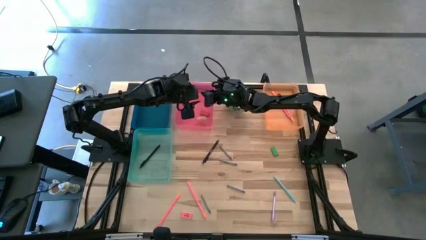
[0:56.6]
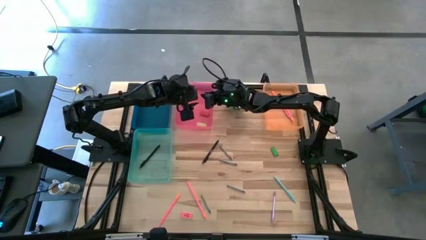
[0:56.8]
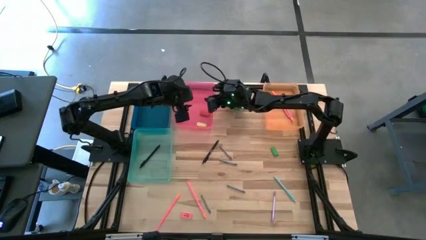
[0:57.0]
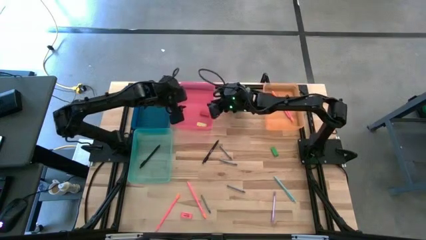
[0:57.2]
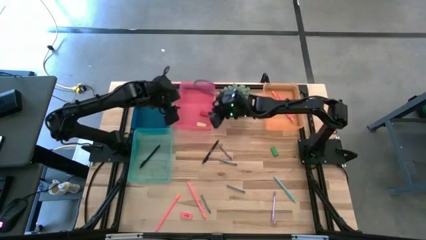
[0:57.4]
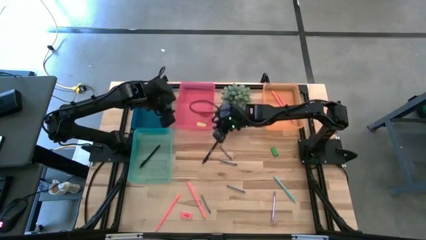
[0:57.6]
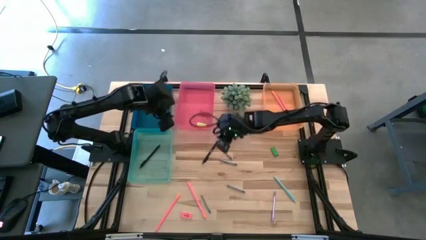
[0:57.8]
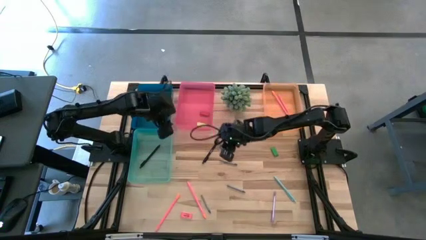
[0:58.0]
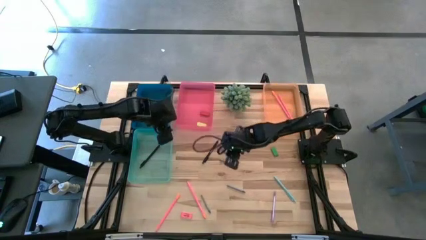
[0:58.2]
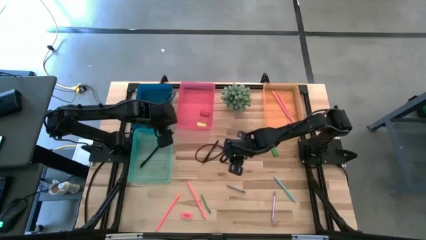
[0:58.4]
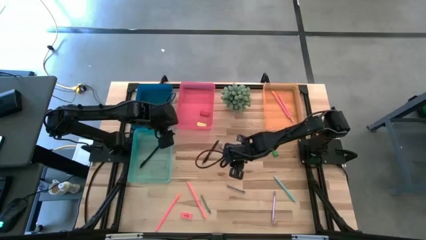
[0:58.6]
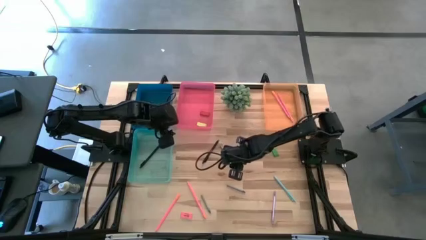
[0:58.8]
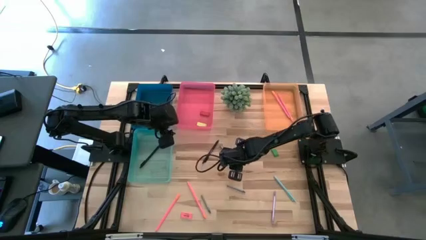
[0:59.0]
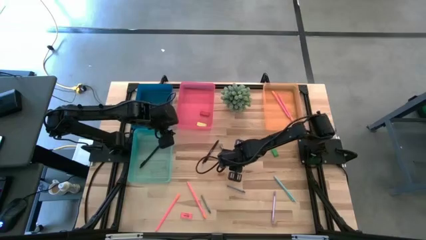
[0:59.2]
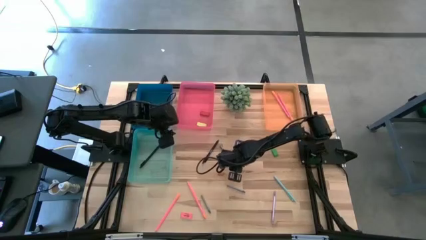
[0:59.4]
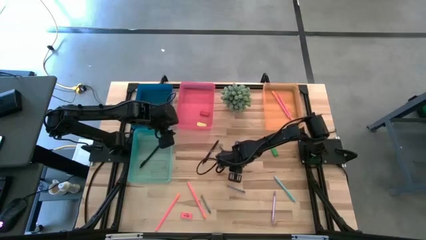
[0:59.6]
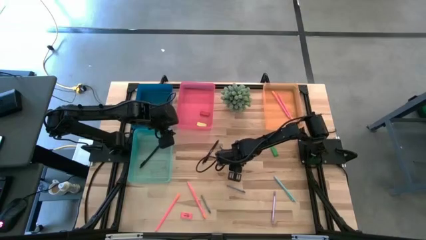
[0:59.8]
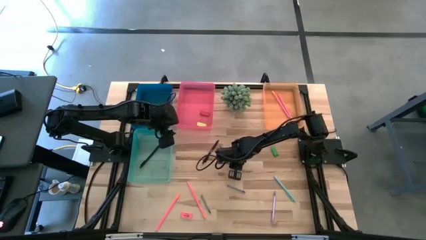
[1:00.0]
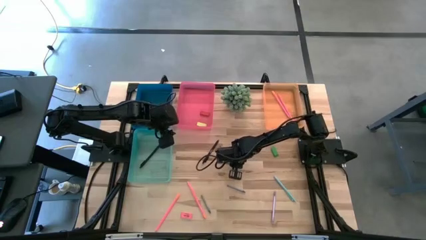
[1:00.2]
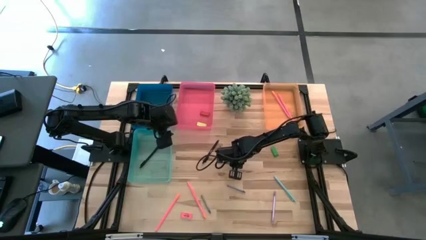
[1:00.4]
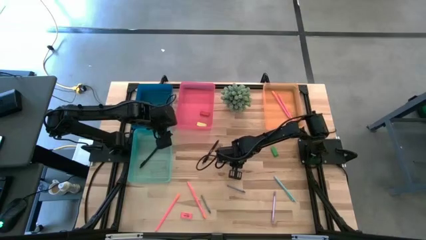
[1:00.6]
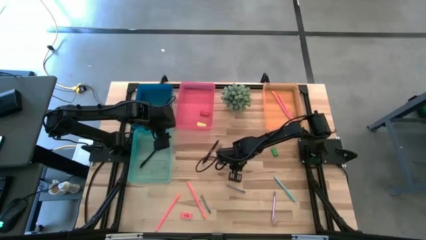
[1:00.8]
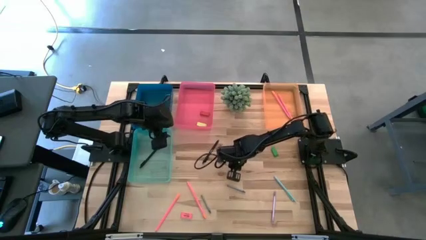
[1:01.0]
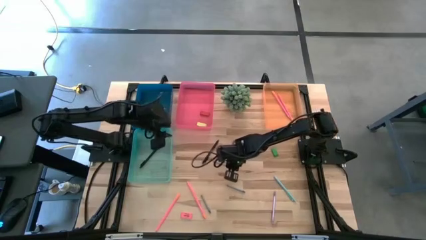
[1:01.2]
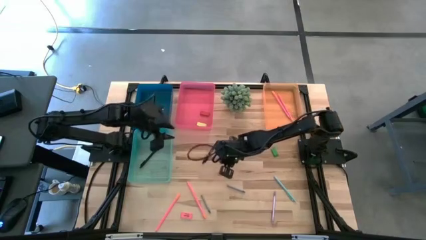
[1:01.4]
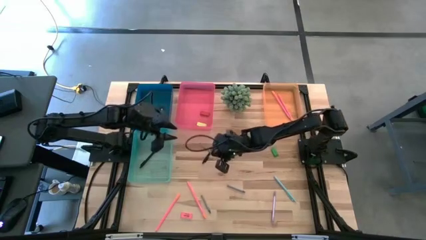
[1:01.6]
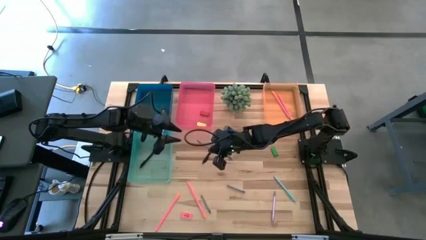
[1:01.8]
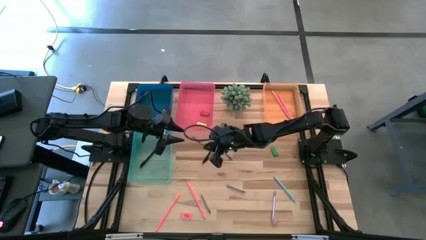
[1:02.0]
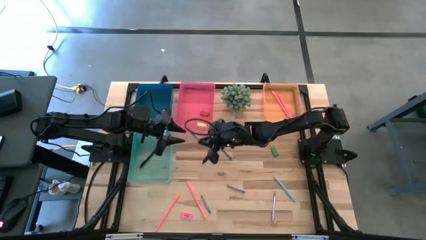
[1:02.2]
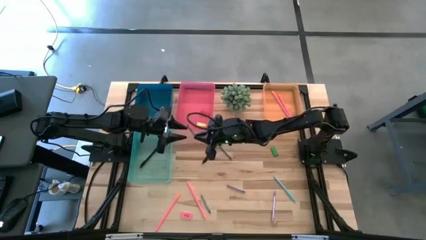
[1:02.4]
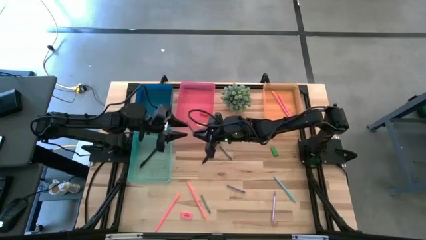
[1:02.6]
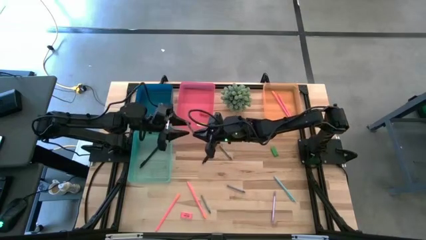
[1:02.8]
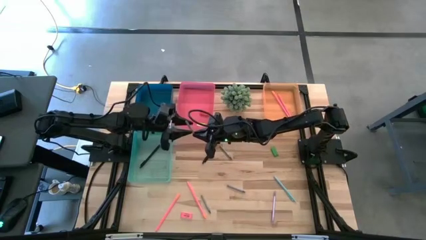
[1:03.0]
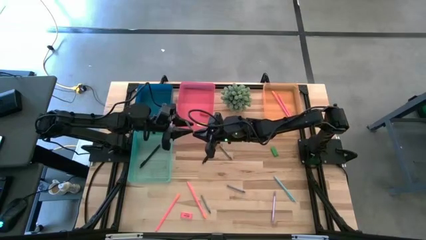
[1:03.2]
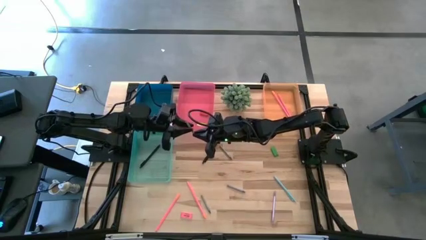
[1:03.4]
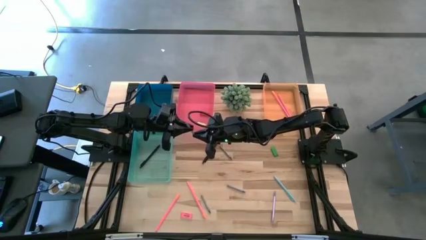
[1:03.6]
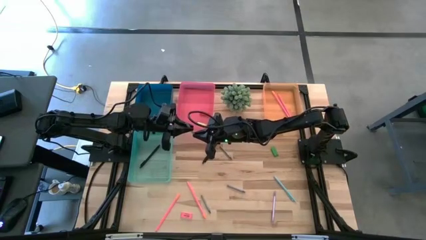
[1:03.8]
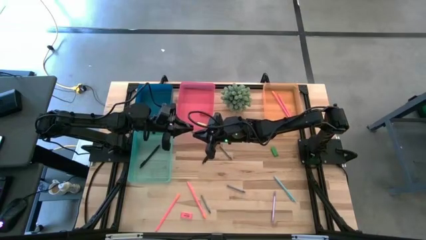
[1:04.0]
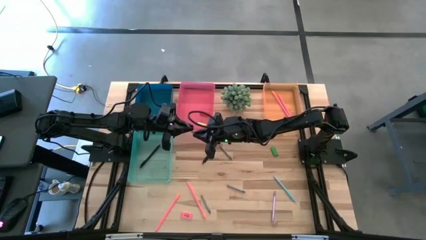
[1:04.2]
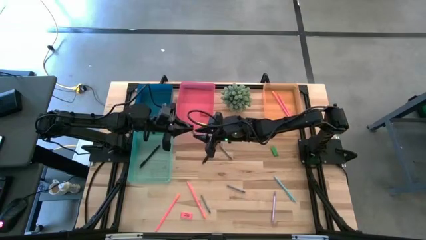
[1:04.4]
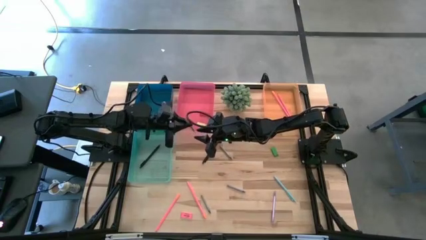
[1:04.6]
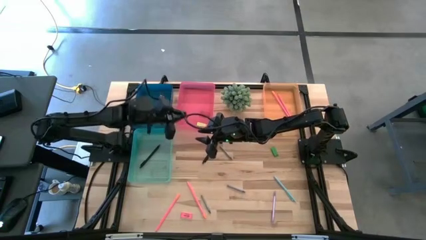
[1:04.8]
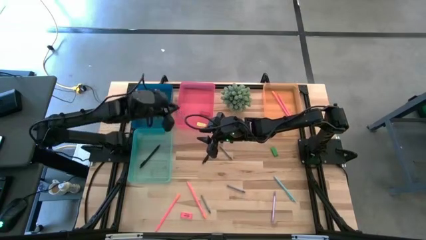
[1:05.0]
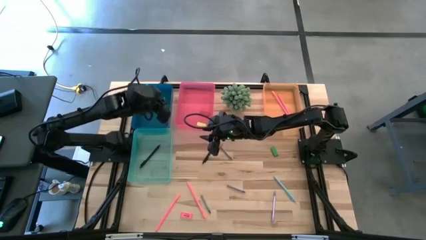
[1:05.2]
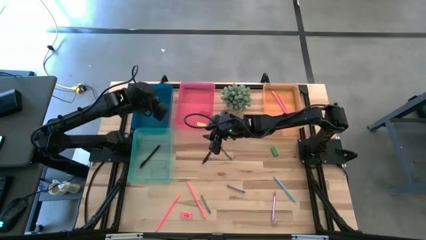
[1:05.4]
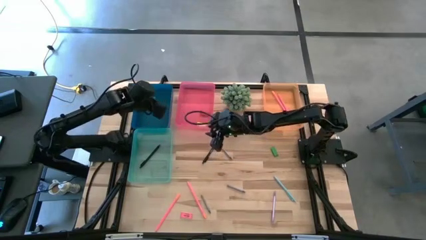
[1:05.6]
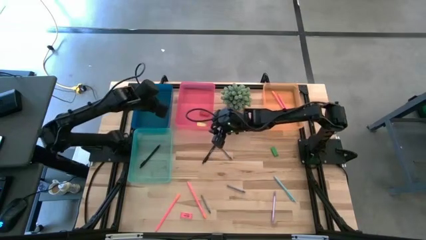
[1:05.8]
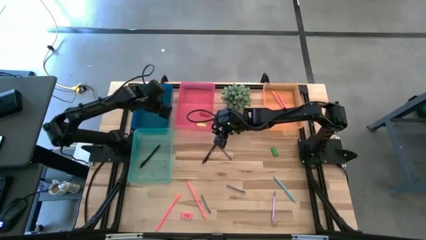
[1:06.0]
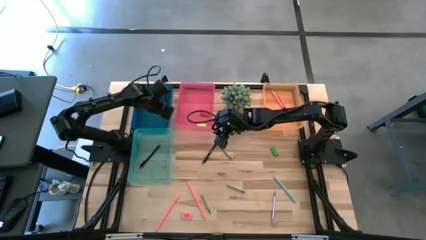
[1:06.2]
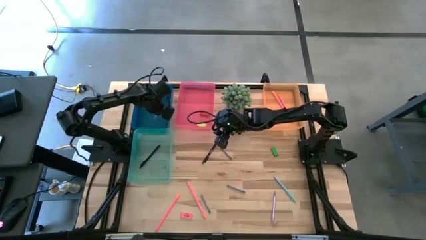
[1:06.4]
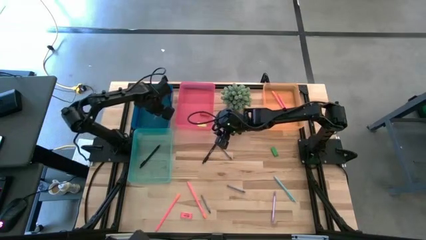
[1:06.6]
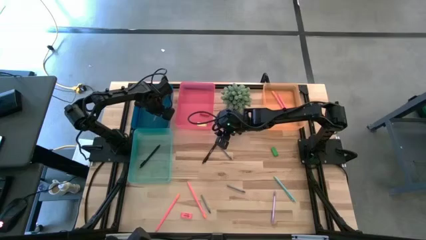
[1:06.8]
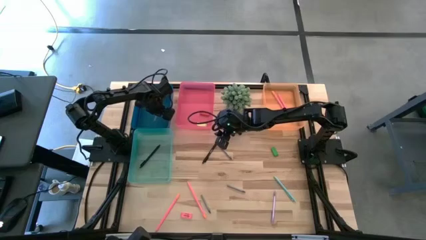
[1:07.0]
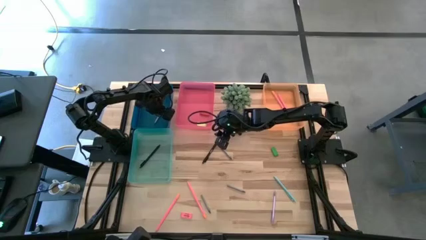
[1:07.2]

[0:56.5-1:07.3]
Task: Sort crayons/erasers/pens/pencils in bins
Put the gray crayon into the blue bin

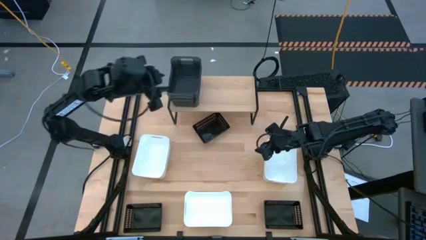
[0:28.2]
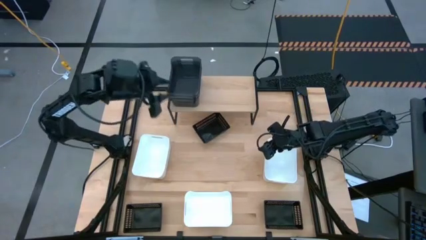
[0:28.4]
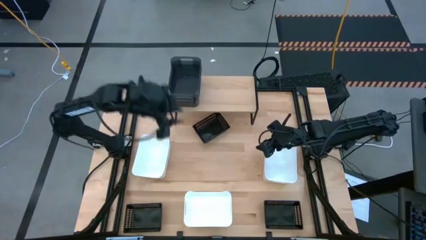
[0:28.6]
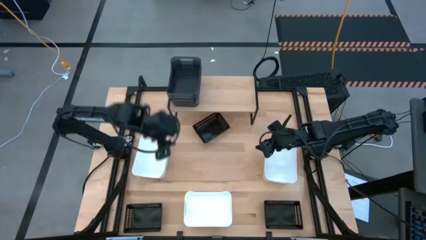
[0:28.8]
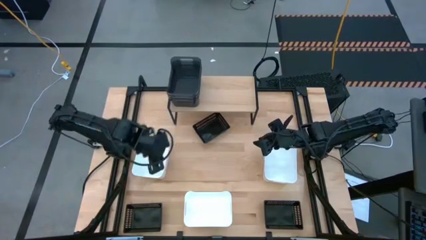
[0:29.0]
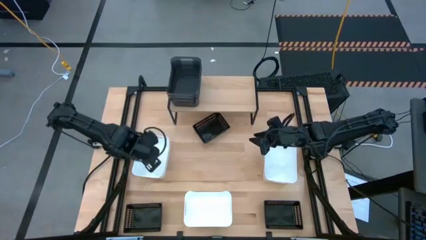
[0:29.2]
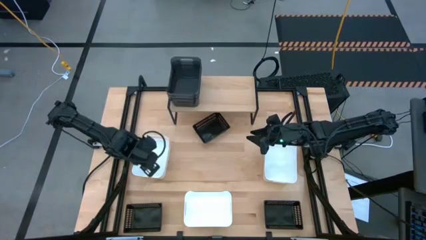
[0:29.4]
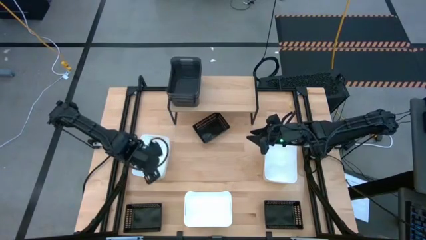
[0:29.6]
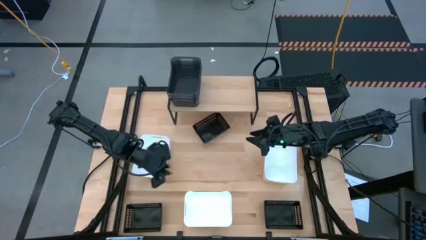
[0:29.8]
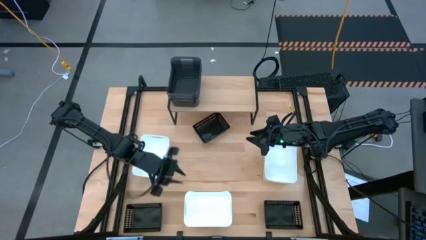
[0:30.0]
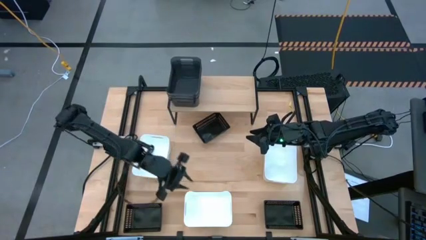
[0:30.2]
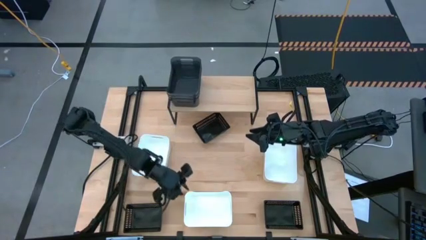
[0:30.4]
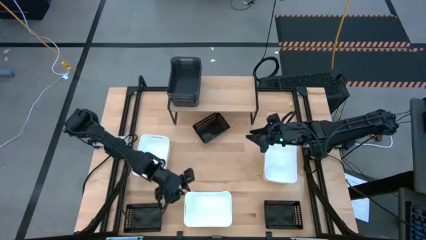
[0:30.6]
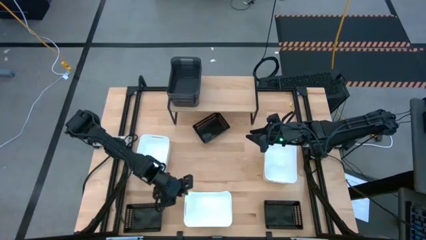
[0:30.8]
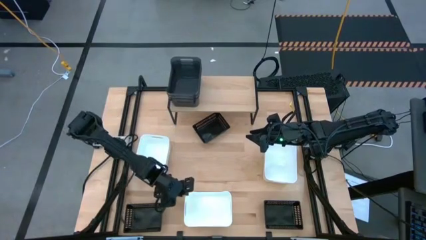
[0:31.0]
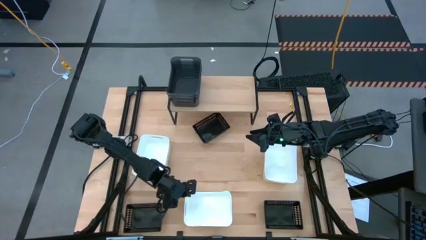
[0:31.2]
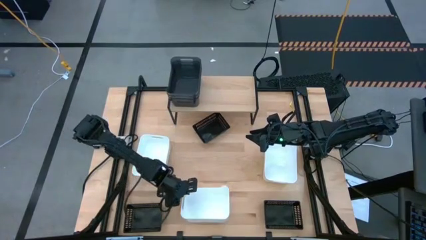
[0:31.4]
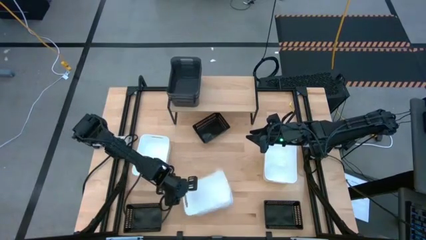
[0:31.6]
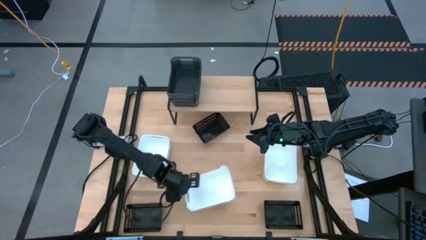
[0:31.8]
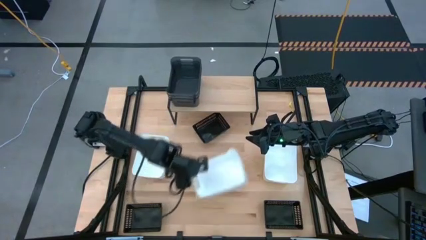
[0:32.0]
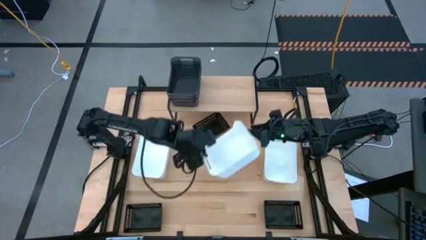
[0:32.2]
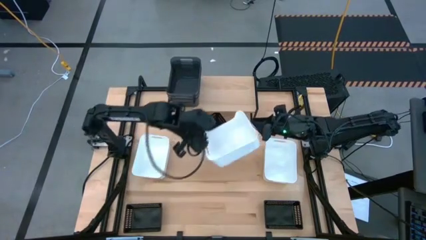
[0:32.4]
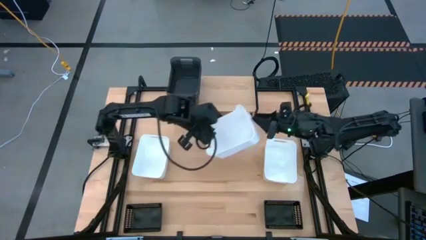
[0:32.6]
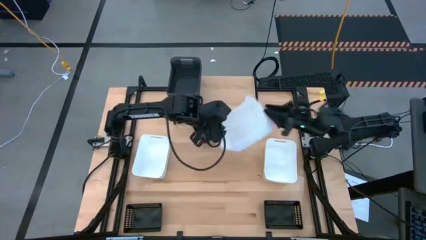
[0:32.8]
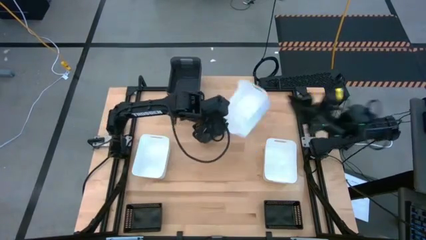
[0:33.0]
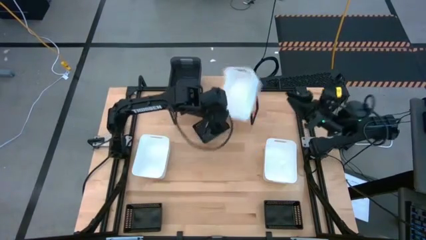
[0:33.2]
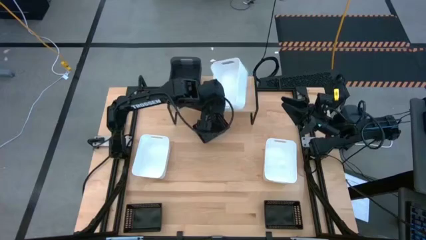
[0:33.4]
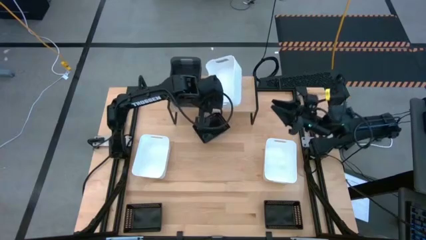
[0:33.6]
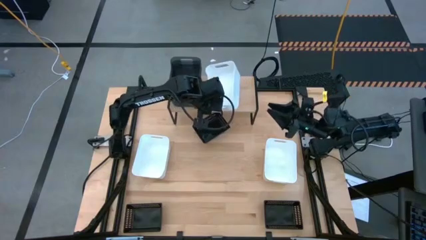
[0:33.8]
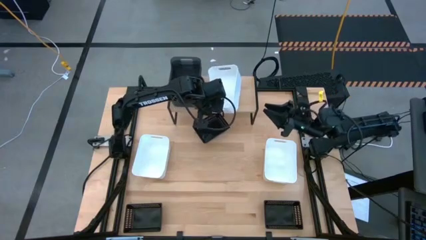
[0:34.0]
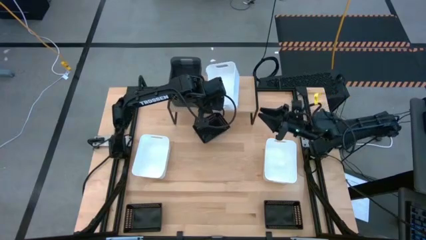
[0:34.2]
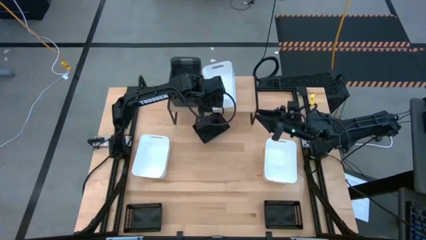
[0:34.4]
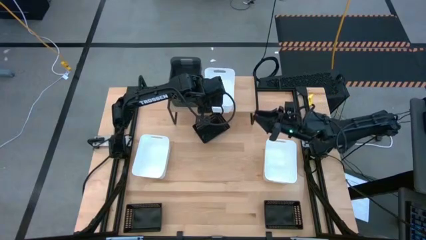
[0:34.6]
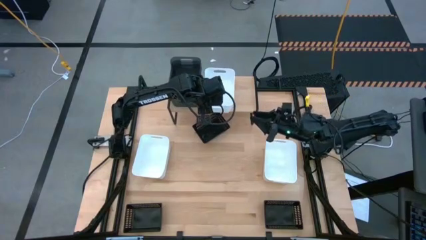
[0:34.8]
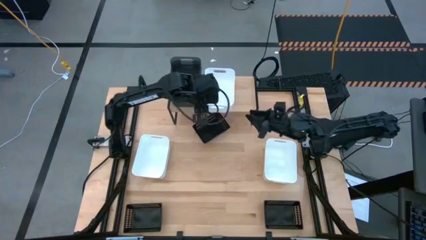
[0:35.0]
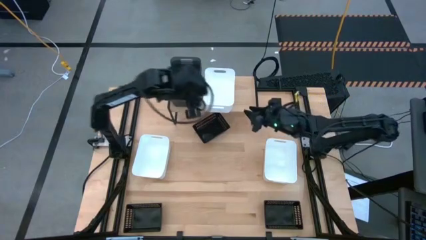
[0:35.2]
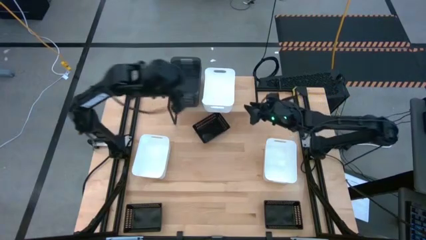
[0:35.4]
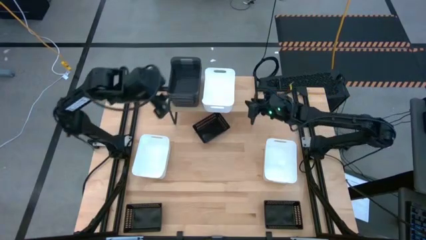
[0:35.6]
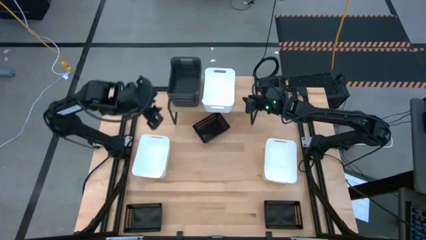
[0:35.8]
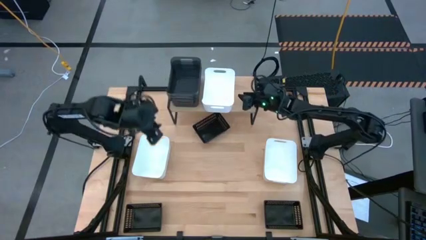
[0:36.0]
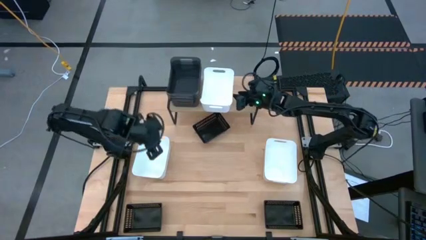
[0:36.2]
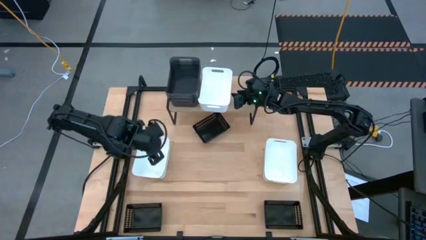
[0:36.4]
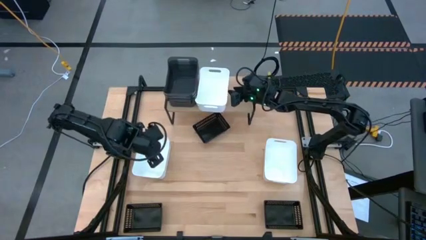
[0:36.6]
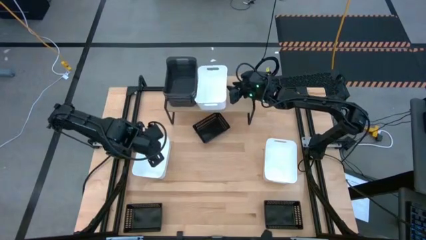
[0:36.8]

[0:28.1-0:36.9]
Task: Stack baskets on shelf by color
Put the bottom white bin on the shelf
